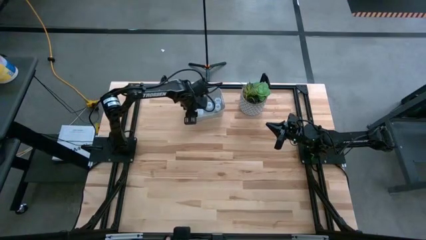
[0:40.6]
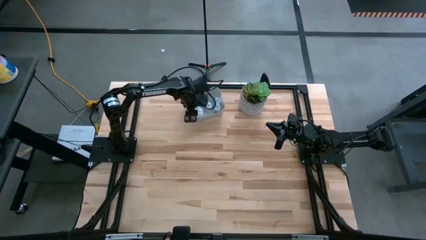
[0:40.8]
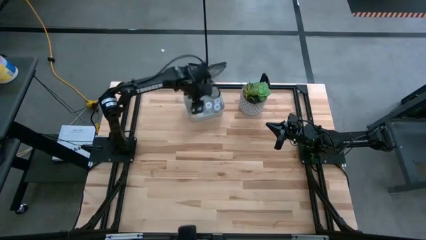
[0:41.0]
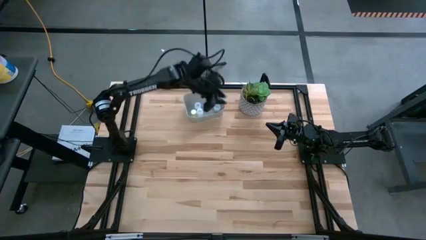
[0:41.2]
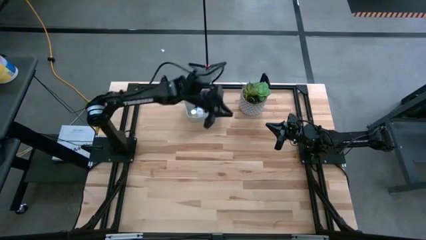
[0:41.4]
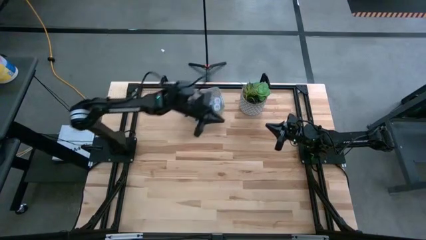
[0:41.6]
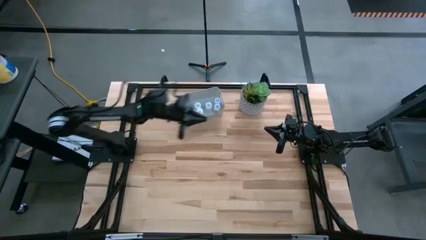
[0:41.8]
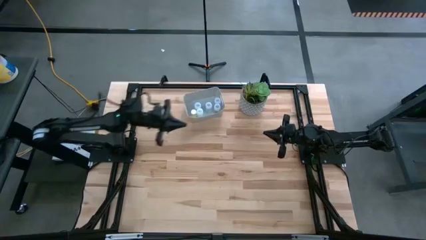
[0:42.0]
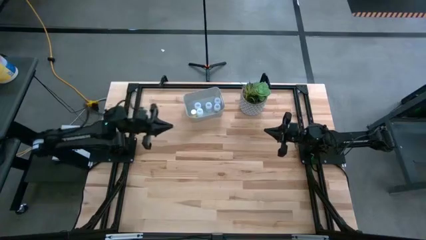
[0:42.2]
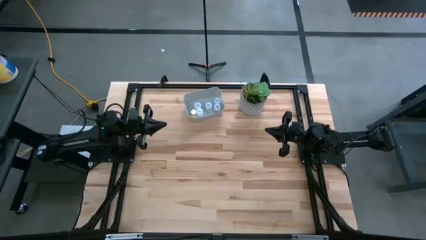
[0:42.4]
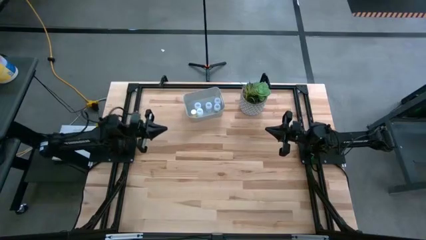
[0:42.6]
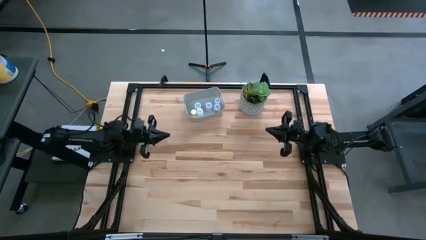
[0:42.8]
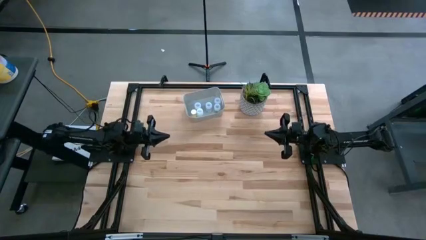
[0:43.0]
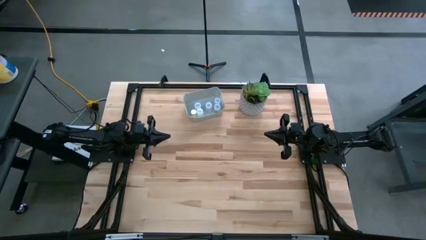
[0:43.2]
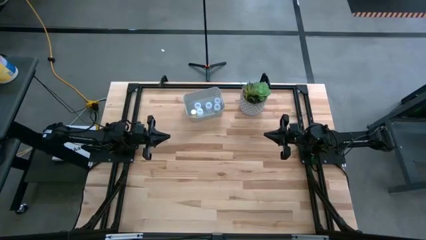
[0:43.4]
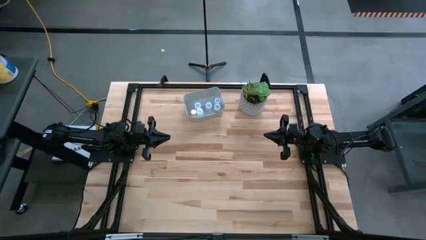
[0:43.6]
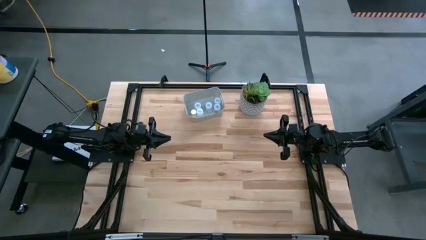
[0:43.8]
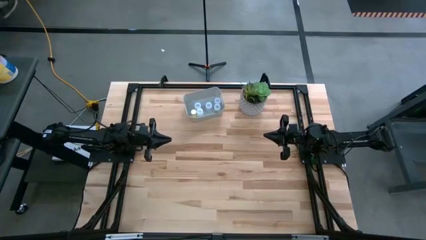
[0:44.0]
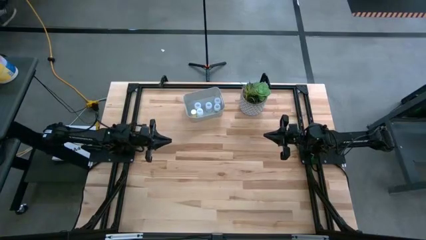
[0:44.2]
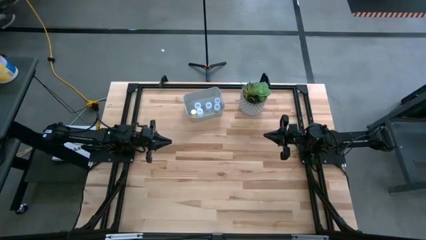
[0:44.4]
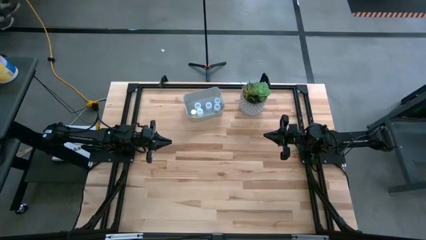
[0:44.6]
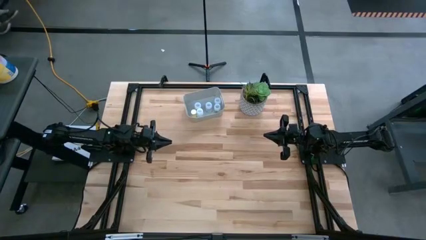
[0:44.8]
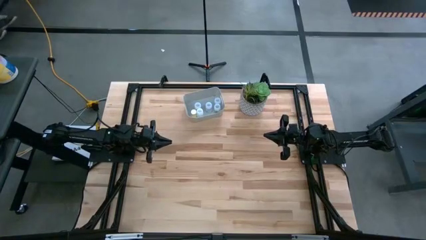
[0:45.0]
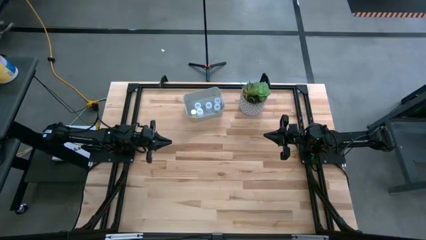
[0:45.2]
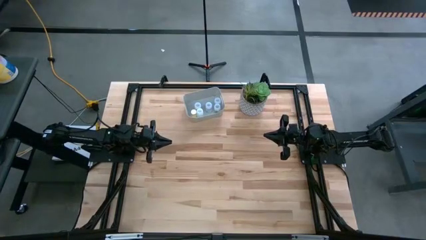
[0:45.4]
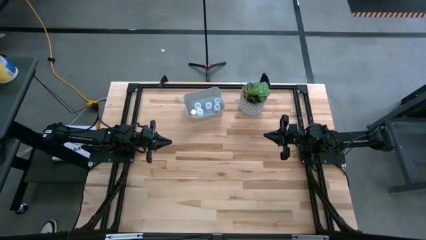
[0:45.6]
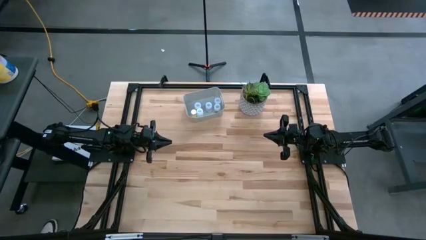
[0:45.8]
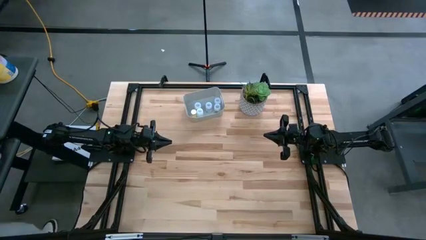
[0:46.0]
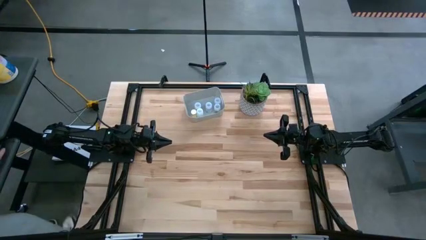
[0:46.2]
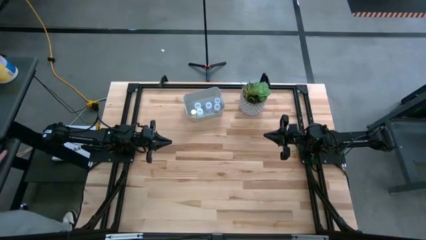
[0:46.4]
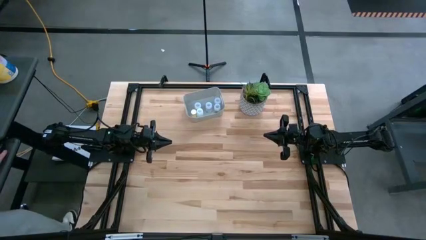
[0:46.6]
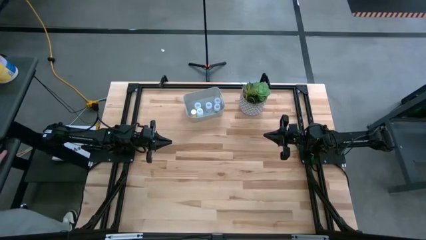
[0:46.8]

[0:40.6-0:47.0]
Task: Pick and place pill bottles into a basket
Return to Home Position

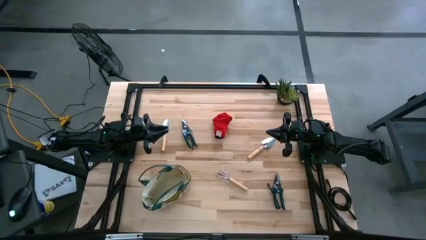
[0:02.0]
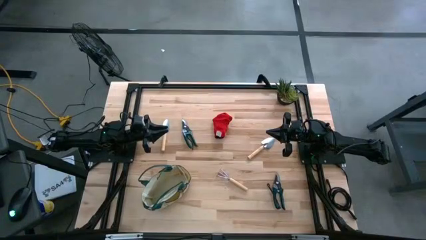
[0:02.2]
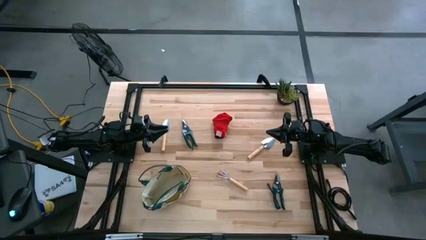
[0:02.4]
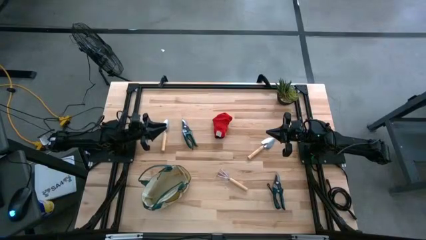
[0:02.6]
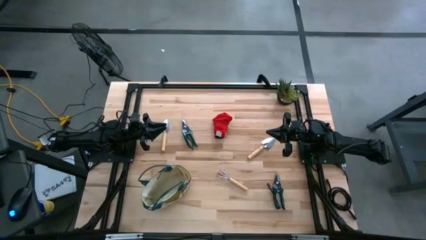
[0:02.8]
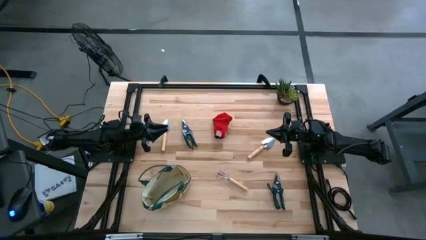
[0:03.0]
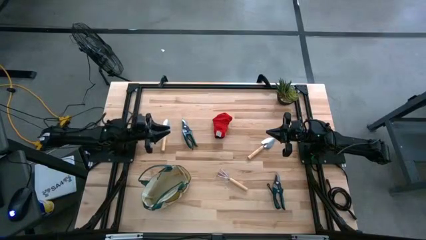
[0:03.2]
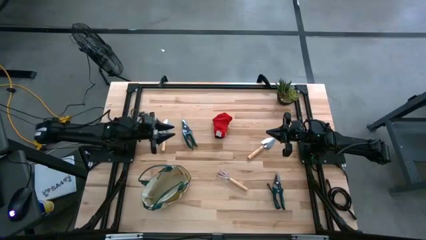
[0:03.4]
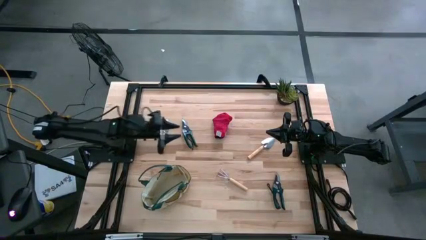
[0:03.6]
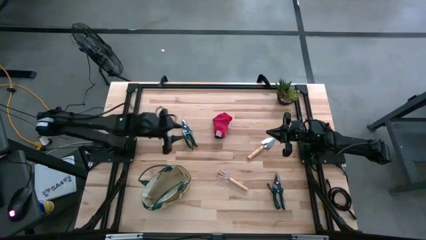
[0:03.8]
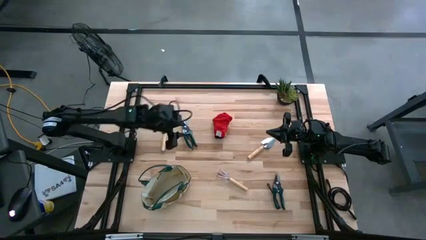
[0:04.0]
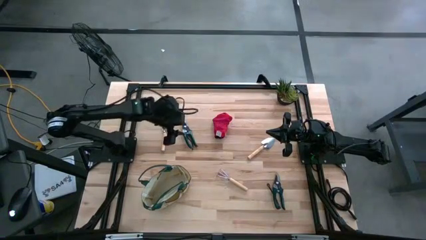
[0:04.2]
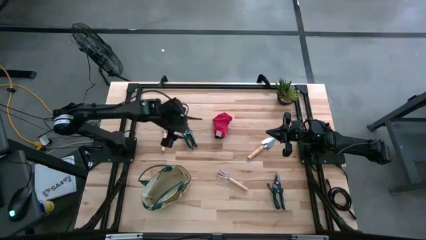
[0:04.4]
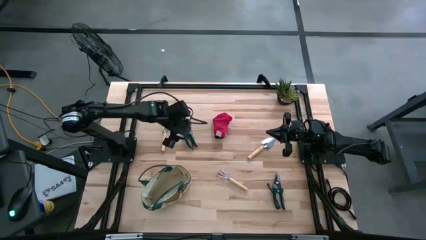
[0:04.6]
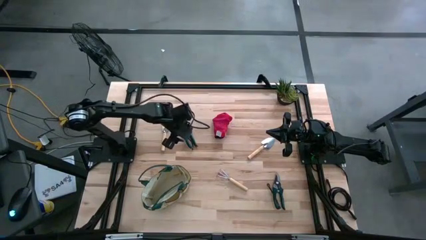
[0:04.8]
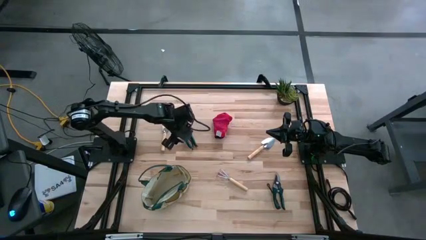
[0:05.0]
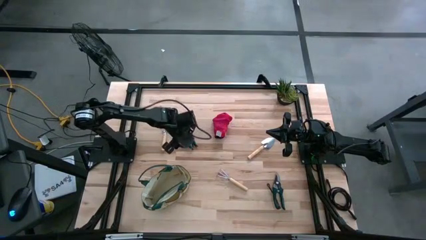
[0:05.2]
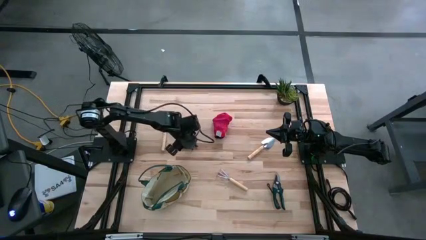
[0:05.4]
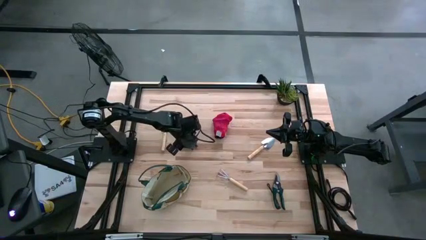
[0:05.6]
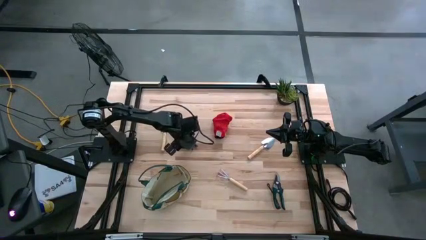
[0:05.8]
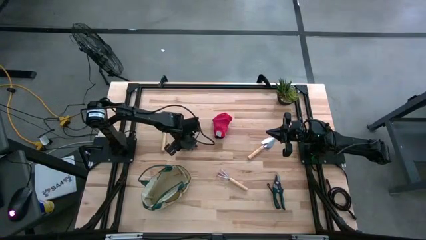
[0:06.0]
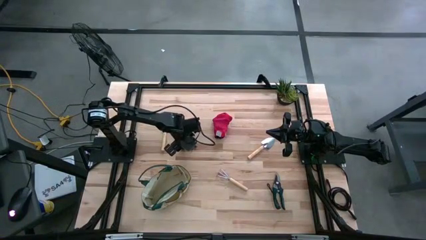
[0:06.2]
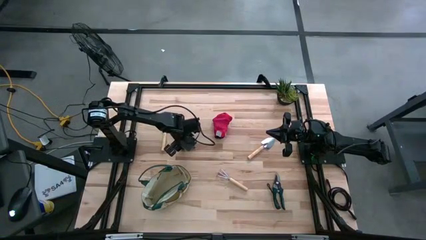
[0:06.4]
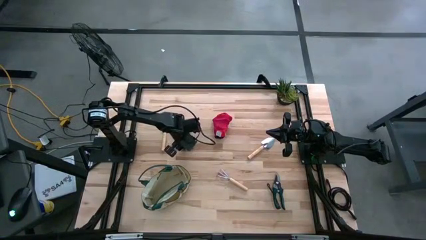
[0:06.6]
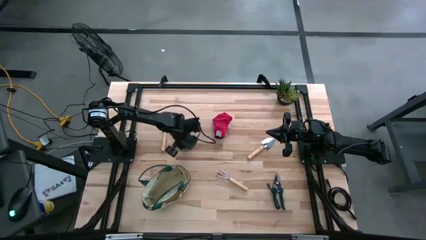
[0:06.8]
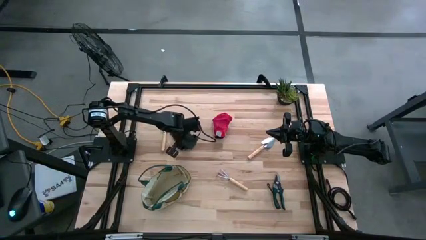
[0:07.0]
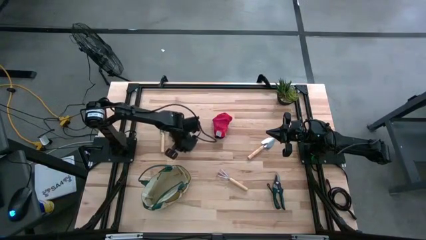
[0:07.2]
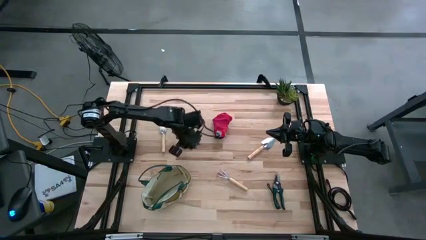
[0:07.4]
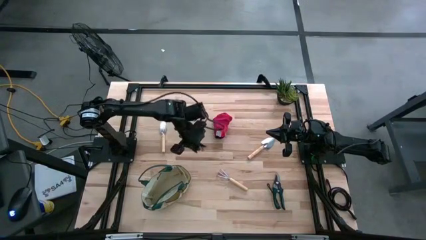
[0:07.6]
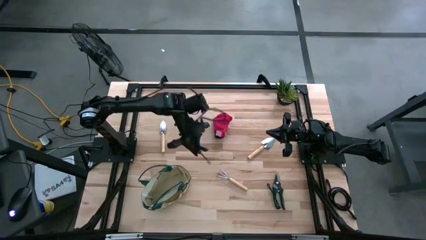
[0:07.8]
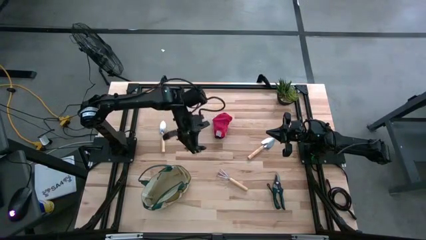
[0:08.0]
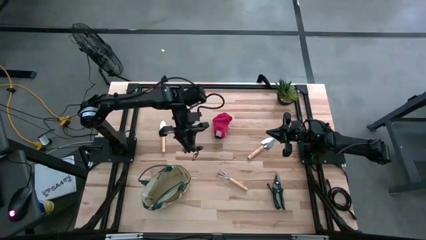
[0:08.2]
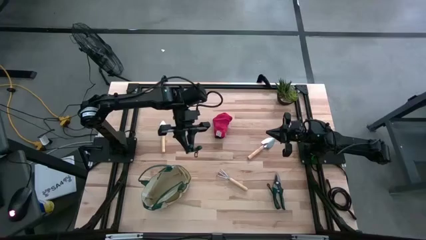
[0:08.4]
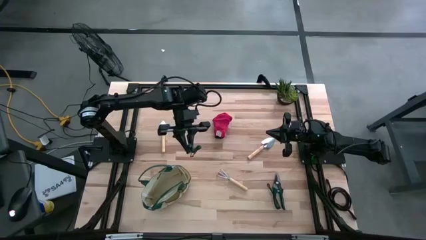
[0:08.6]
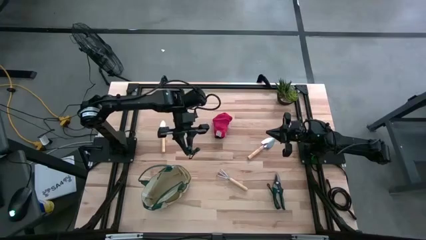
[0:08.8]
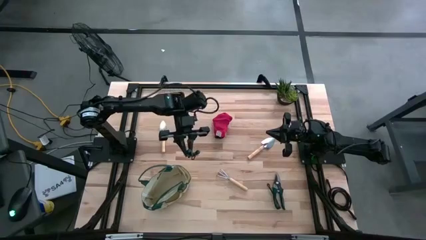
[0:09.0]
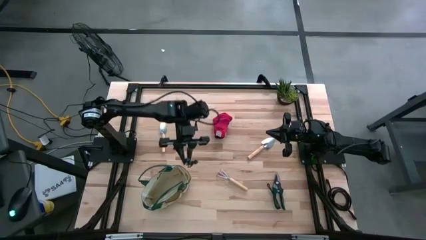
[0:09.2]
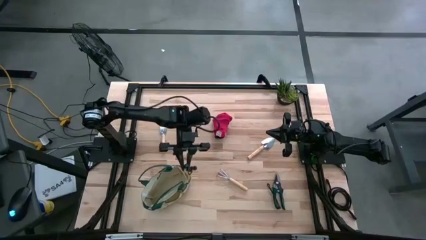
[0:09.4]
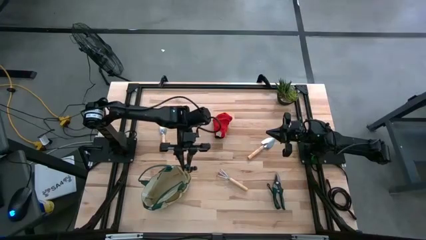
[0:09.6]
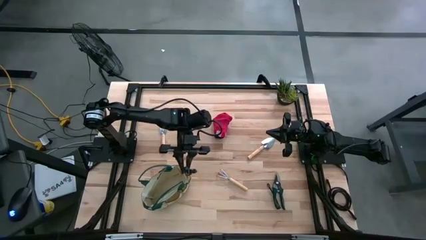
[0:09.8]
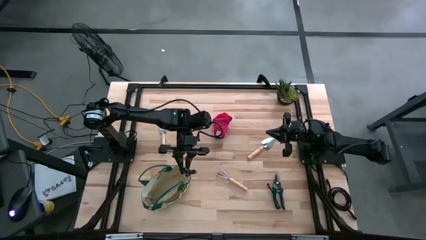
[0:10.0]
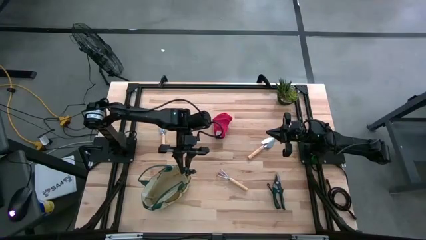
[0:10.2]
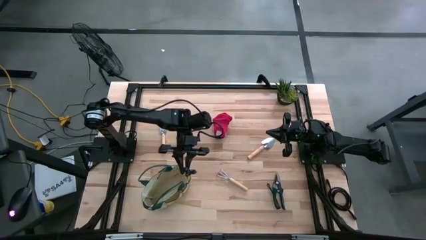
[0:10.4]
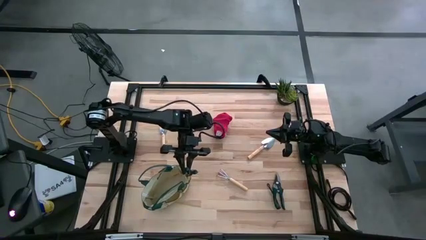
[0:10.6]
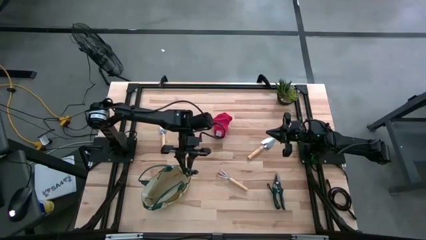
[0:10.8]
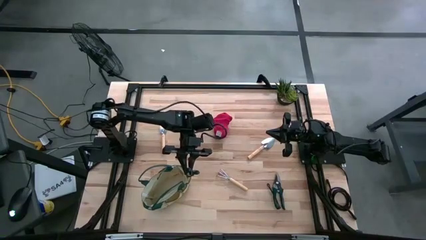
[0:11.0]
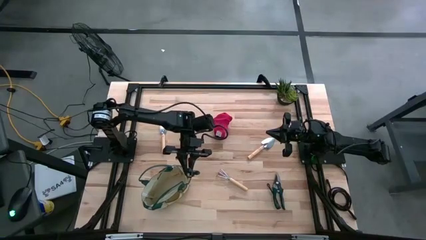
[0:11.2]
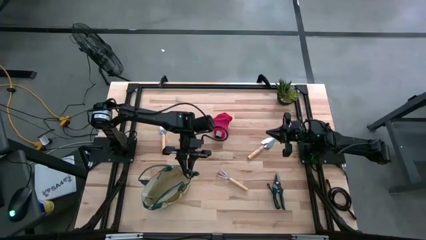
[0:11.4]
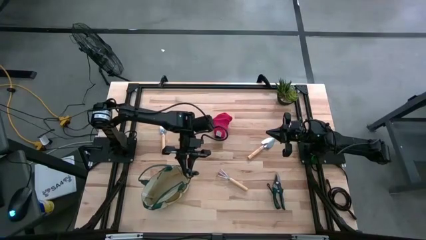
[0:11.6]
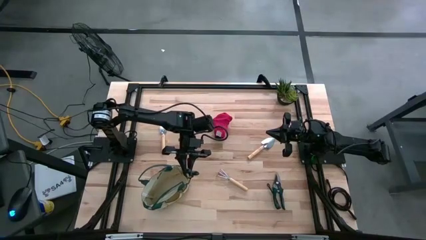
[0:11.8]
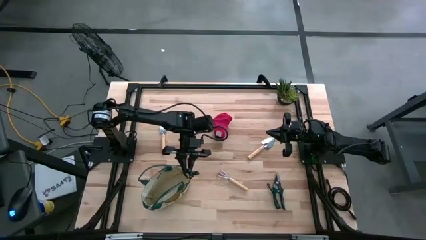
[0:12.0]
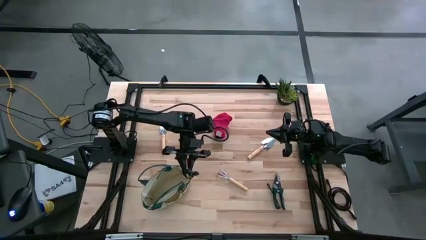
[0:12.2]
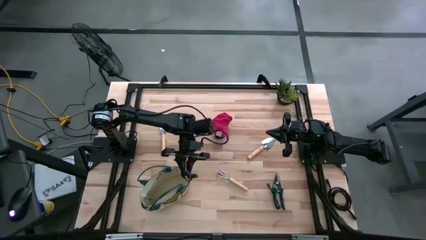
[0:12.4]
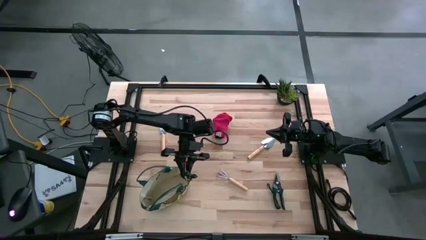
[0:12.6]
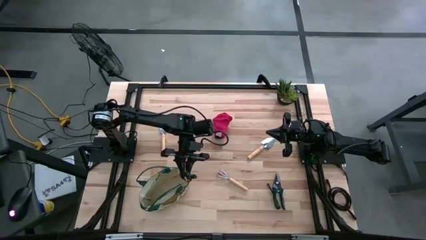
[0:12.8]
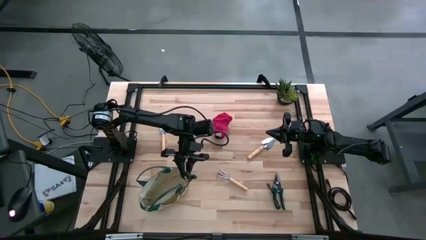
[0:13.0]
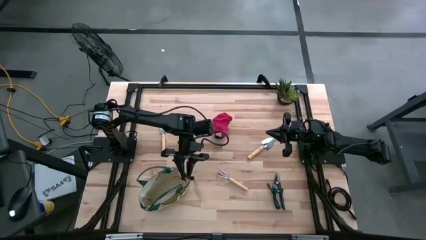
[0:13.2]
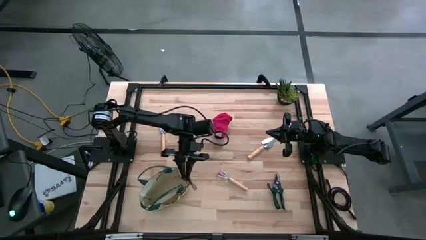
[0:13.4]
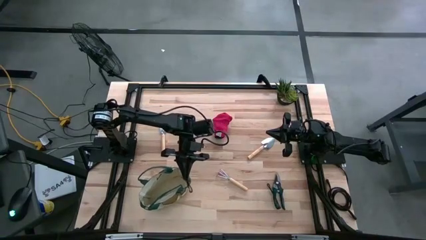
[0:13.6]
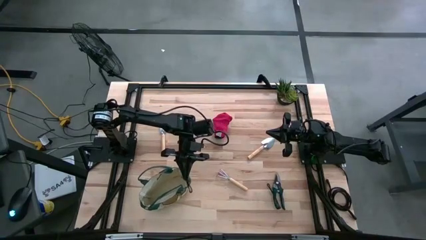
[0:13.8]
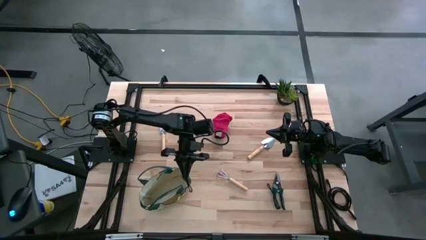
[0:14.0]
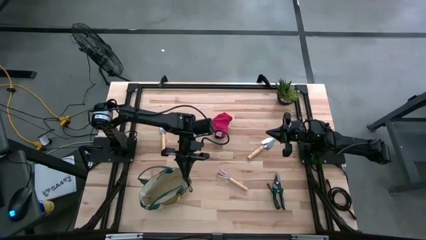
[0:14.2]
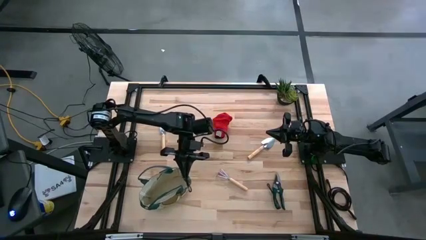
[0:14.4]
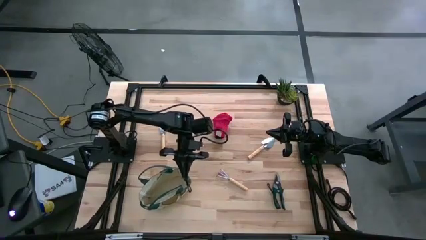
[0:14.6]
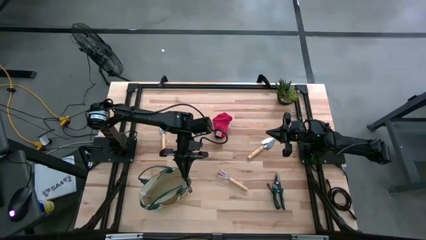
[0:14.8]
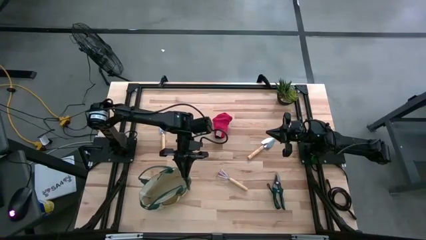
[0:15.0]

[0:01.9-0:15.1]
Task: Pick & Place Garden tools in Gardening bag
Put the left shear scissor into the gardening bag
